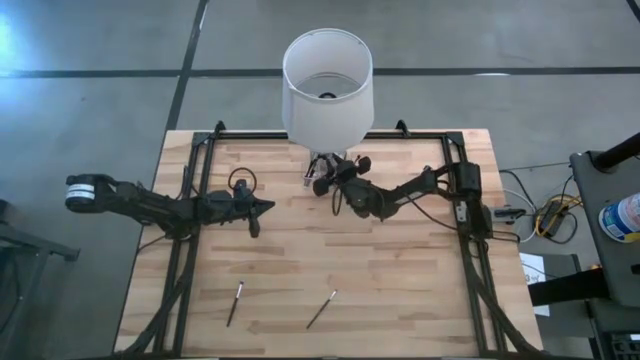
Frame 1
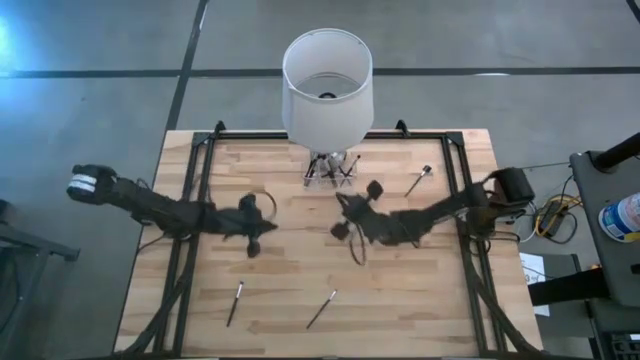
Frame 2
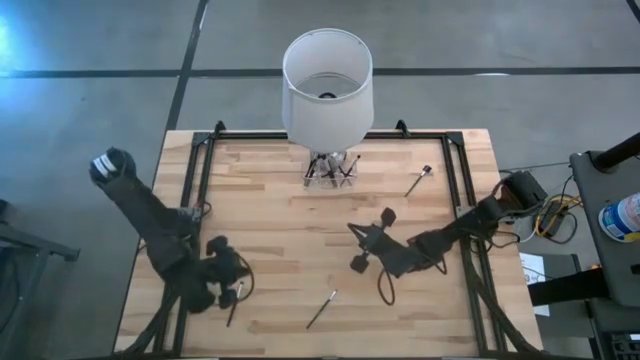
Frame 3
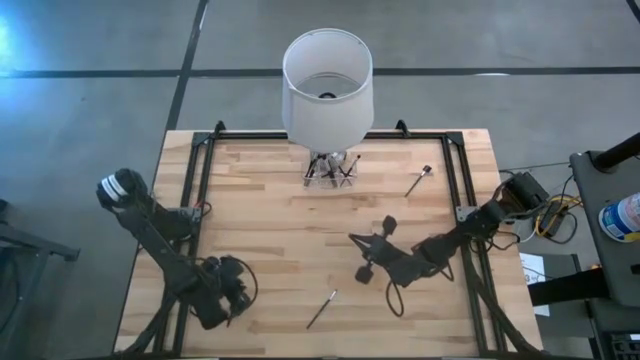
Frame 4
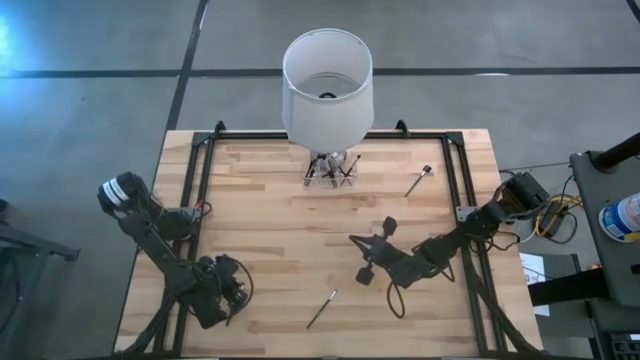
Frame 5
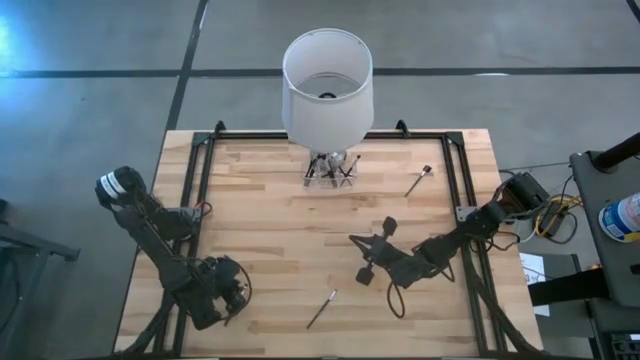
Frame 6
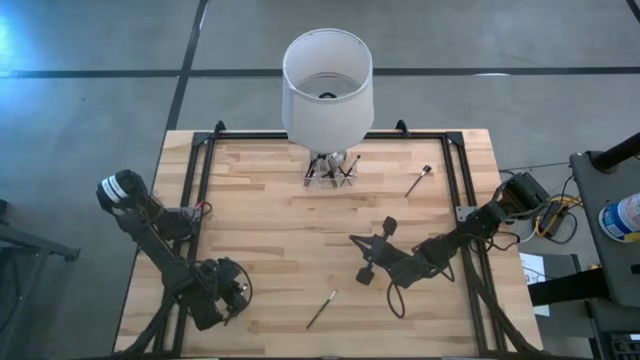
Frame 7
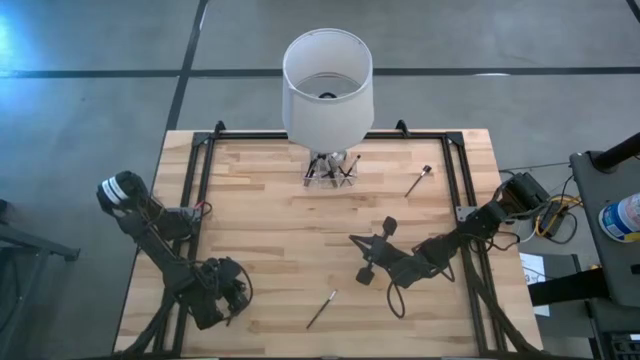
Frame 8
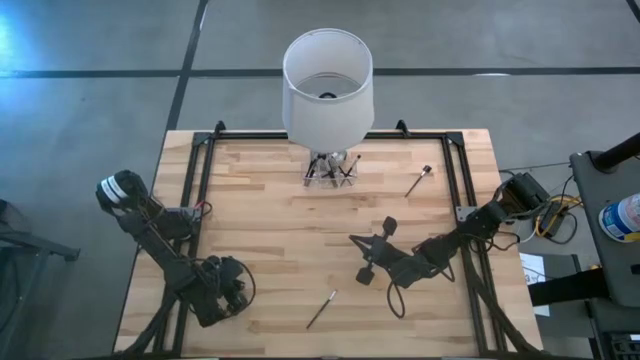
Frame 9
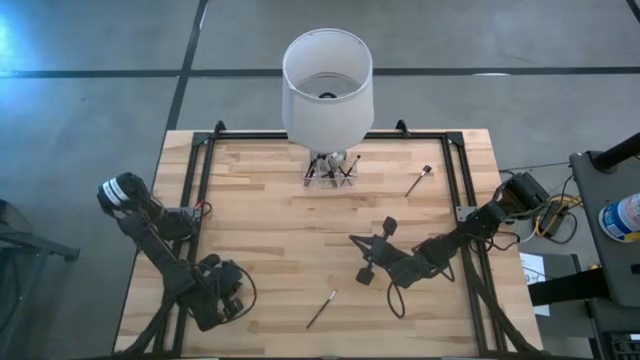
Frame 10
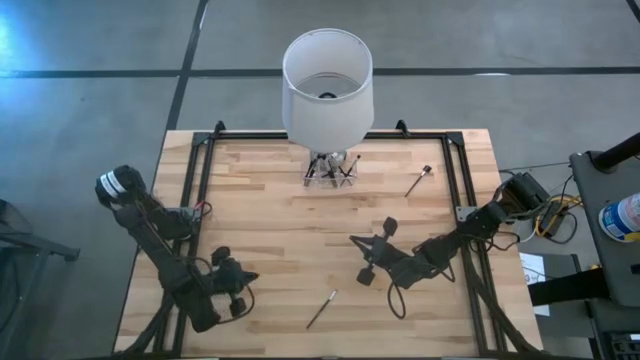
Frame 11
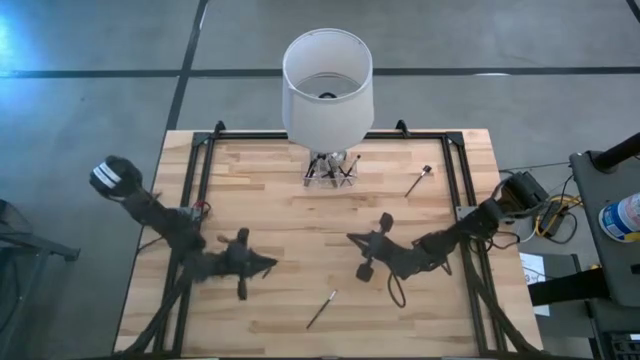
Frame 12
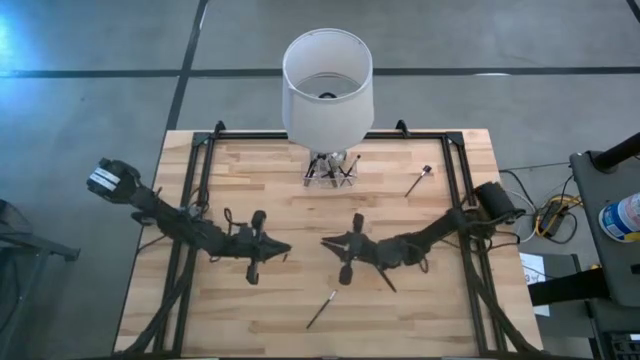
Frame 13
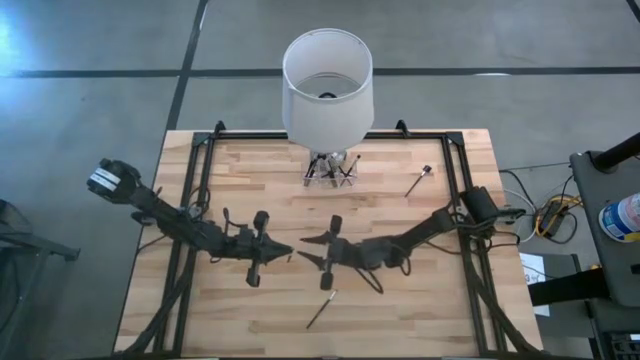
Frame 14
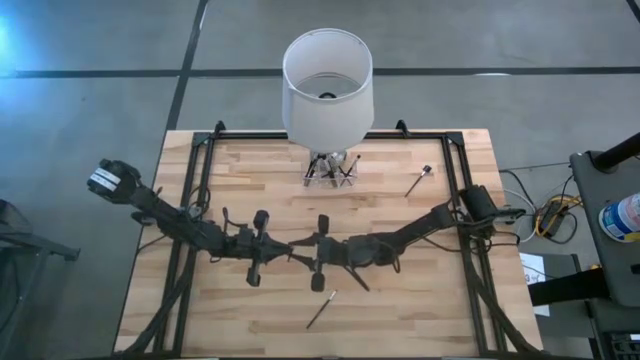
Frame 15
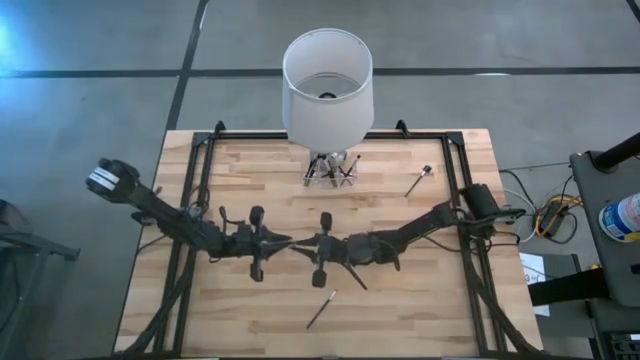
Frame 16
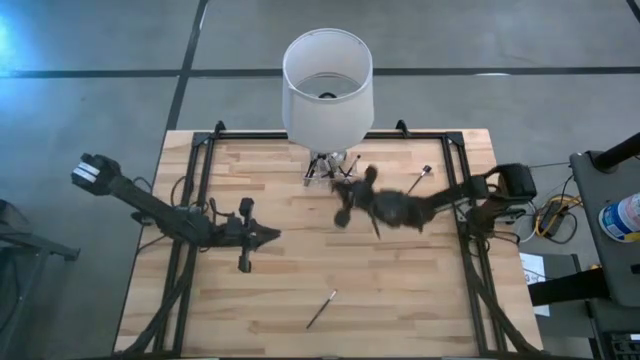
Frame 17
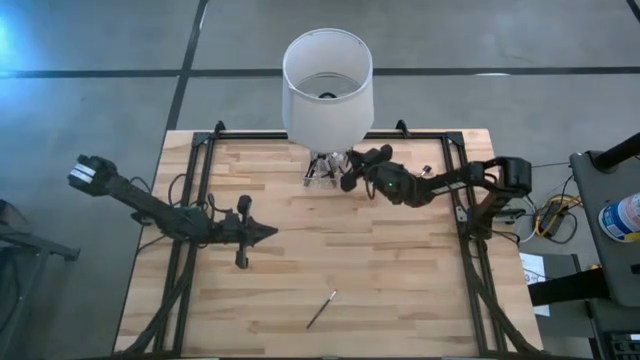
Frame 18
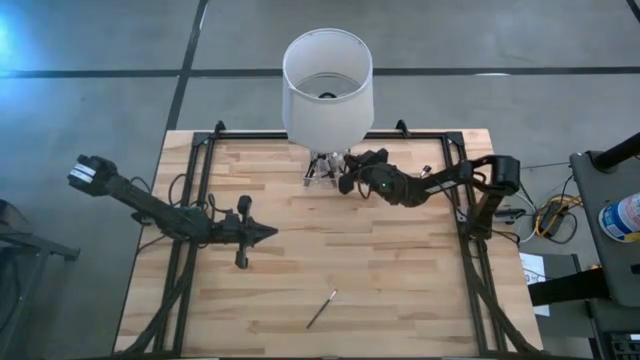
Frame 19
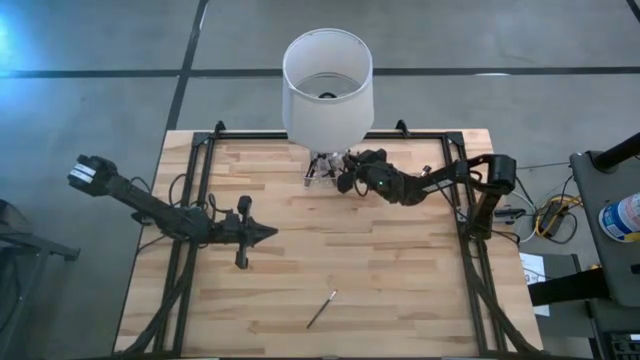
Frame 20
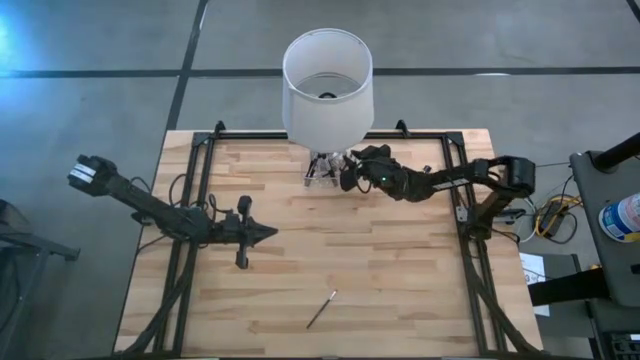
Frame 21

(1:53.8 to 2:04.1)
Task: Put items in baskets/containers
Put the black foundation brush into the transparent organizer

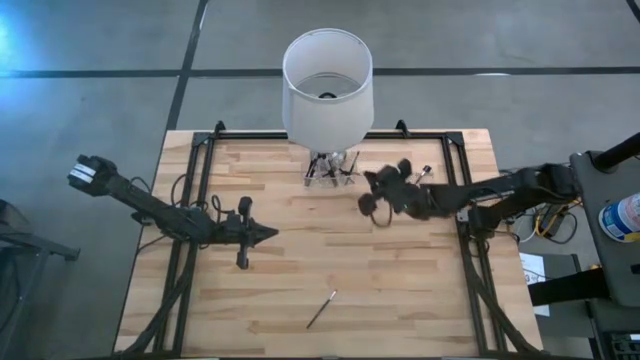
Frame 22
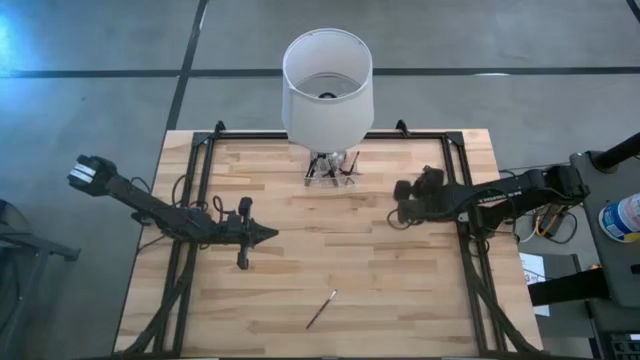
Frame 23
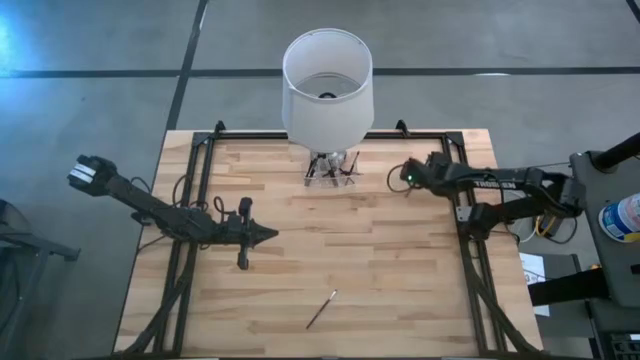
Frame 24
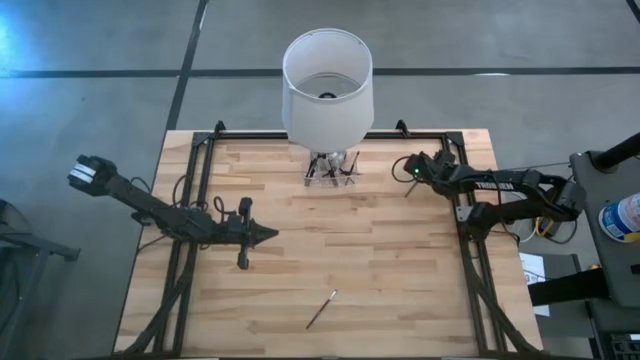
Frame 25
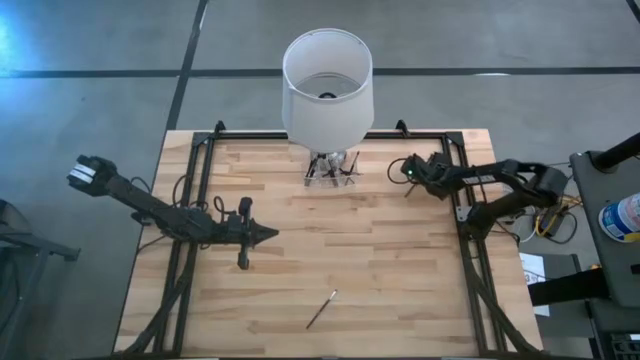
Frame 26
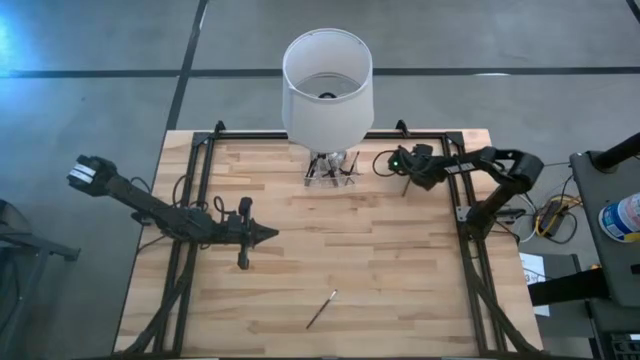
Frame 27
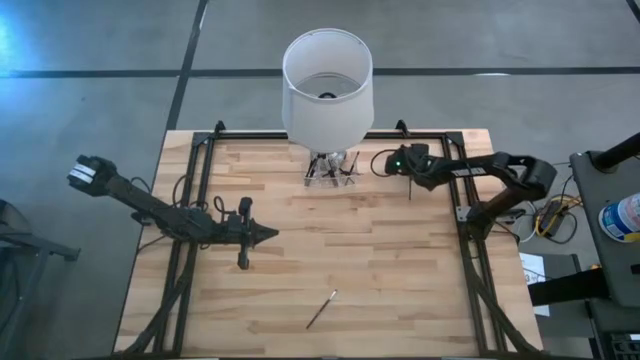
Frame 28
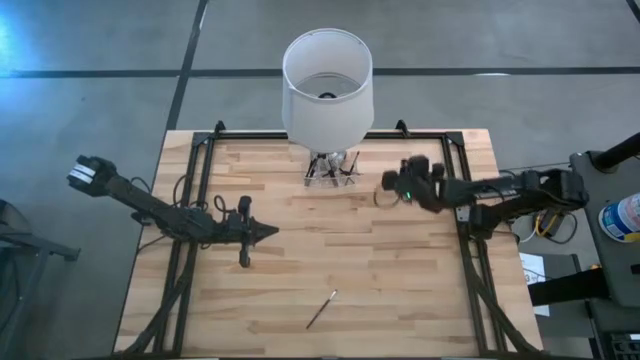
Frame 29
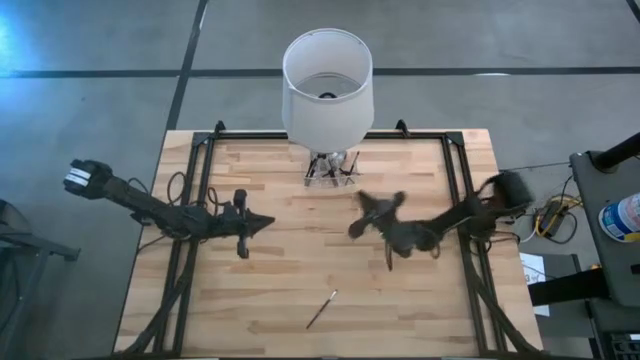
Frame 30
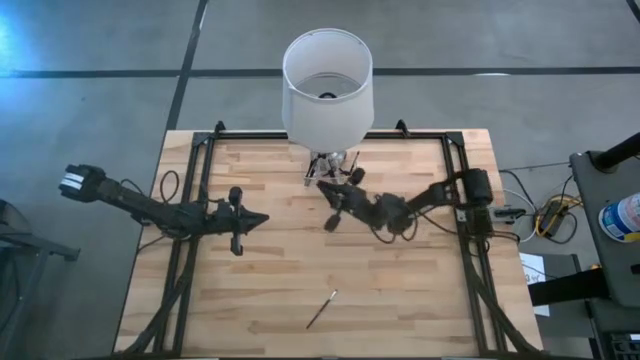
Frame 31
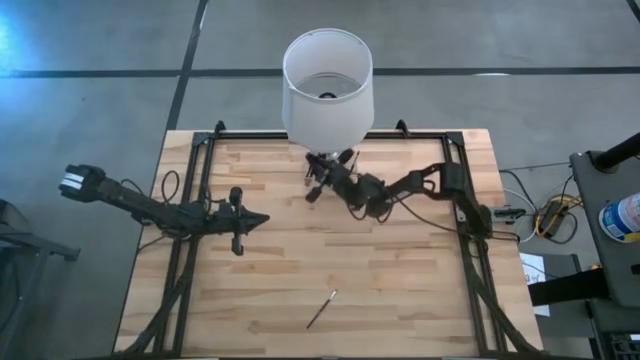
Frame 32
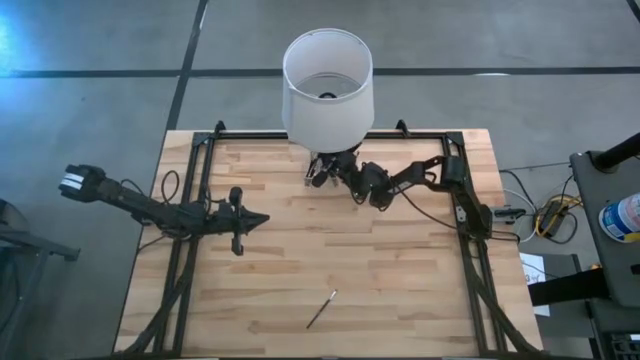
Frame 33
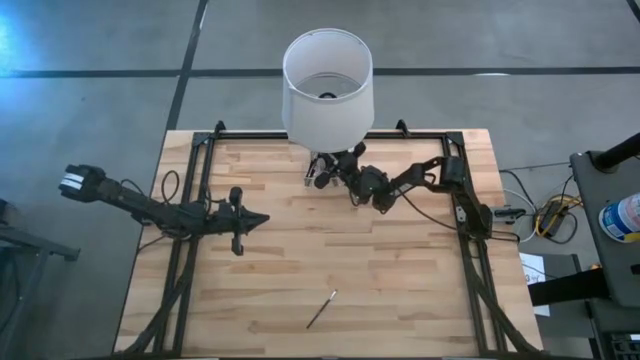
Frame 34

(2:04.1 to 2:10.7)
Put the black brow brush into the transparent organizer

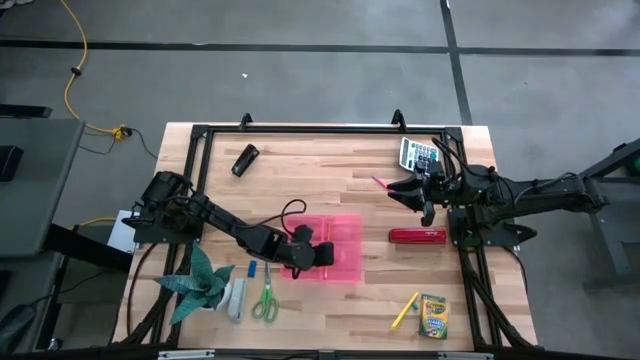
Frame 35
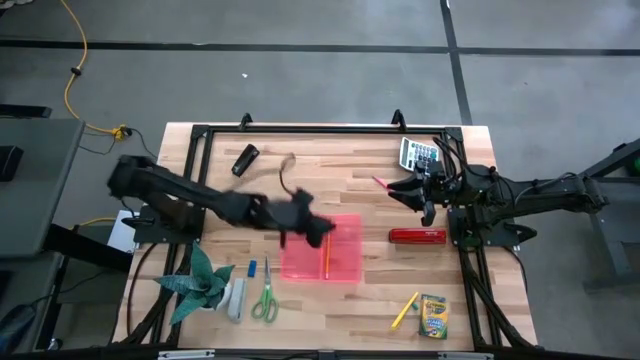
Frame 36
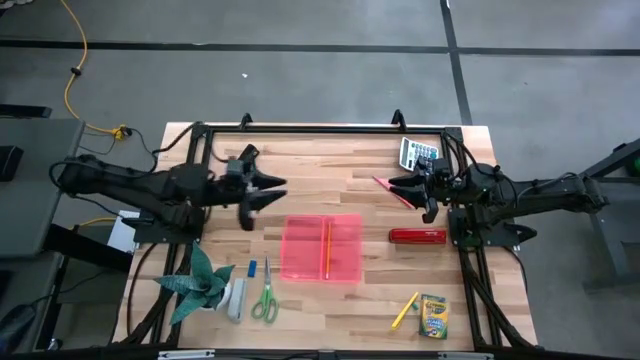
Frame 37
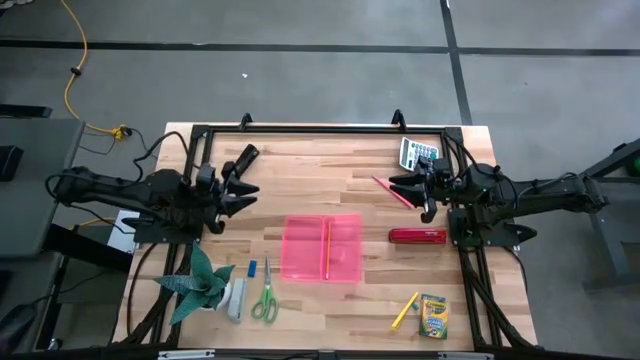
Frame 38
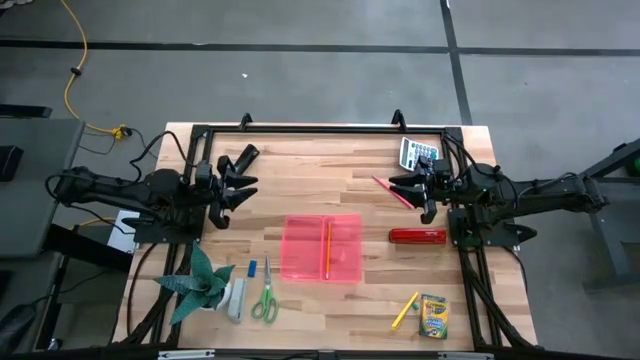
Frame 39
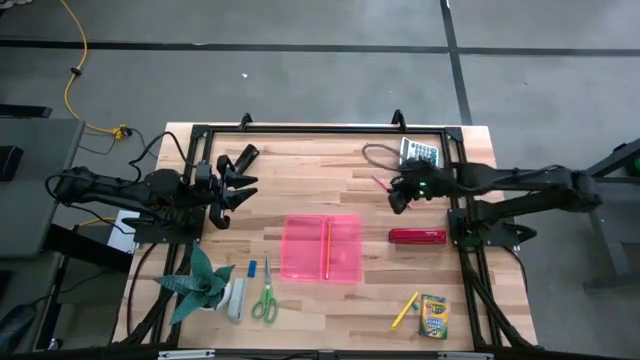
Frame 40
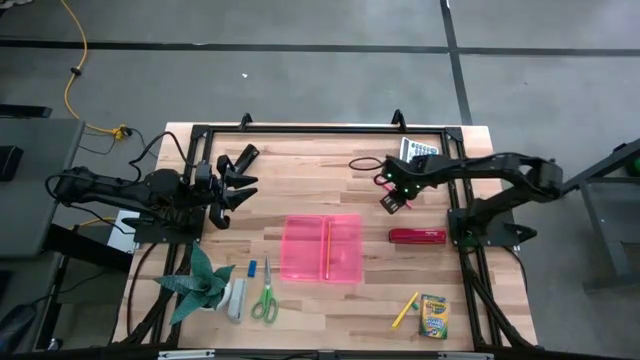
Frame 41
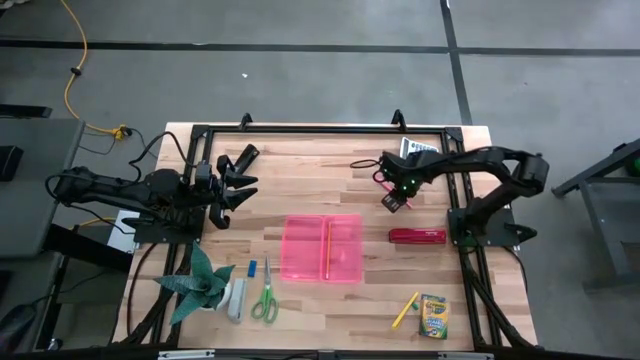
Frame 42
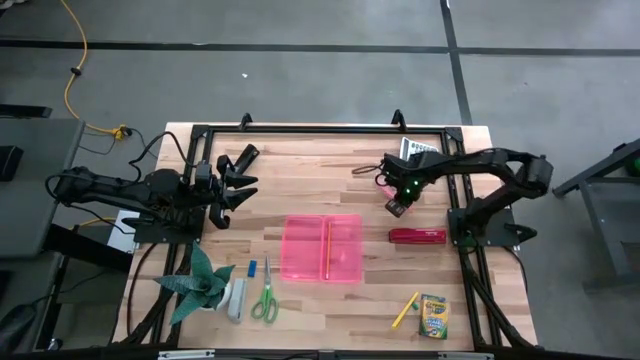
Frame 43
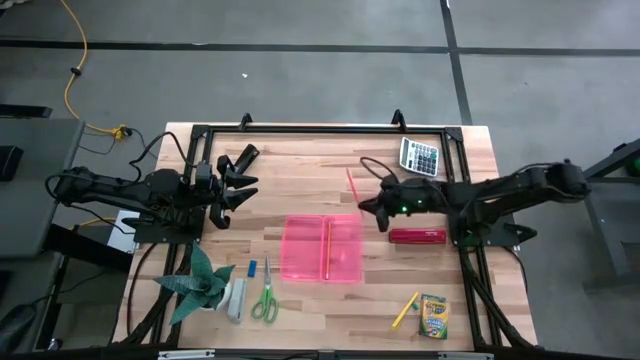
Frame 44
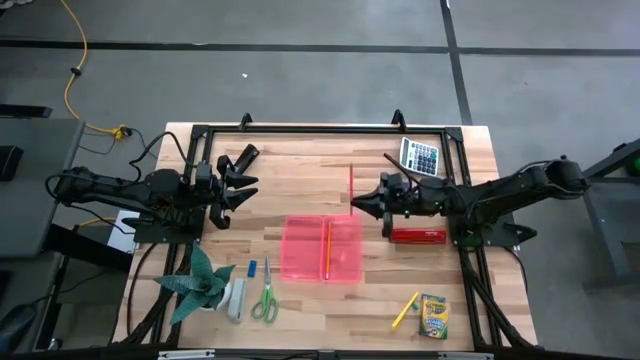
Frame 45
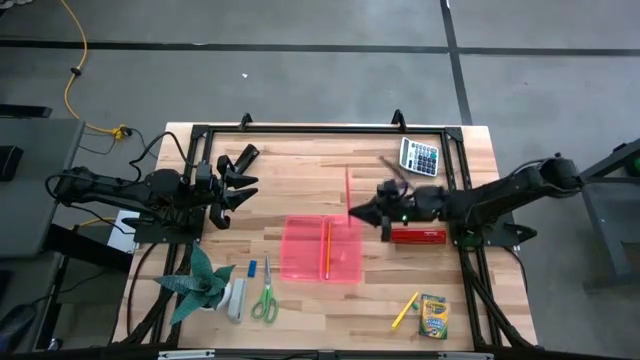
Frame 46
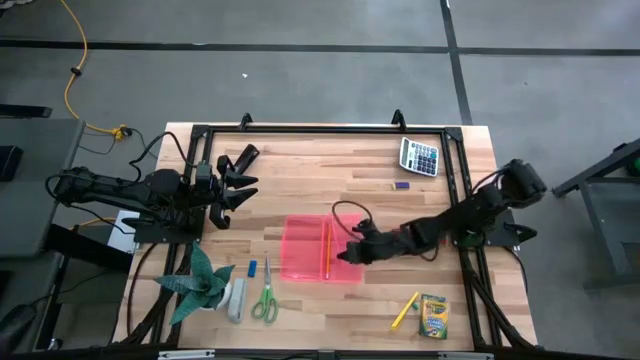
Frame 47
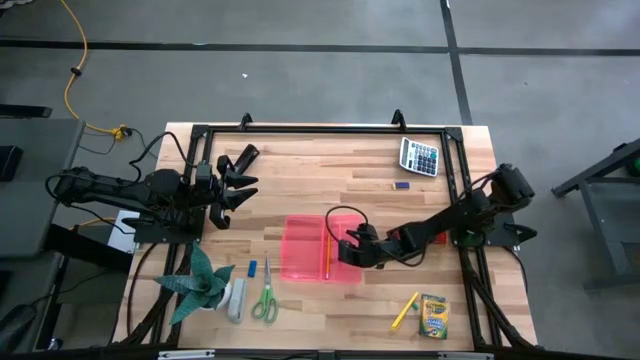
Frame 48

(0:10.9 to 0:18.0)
Task: Pack school essentials
Put the pink pencil into the pink supply box
